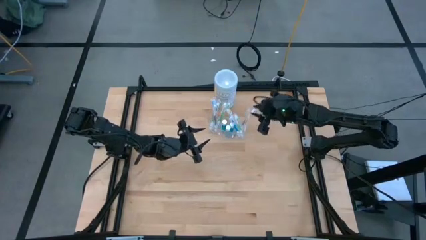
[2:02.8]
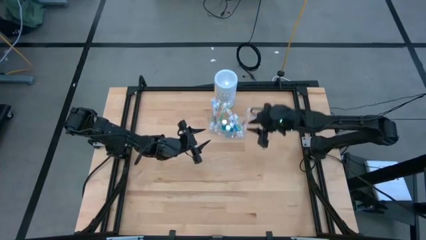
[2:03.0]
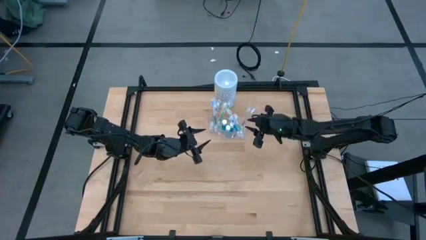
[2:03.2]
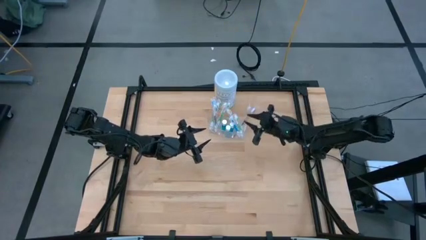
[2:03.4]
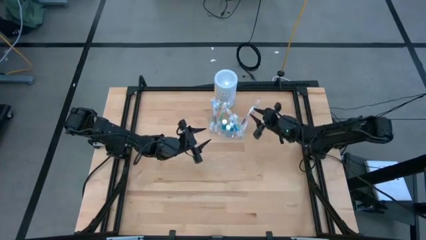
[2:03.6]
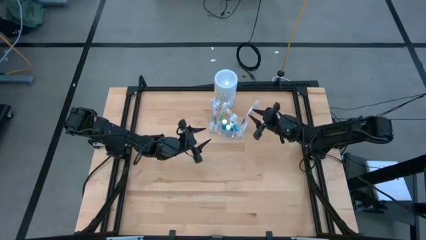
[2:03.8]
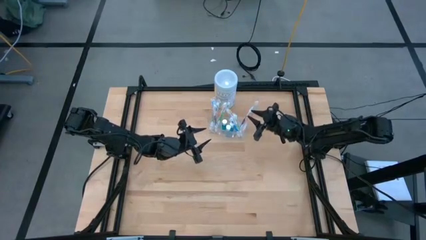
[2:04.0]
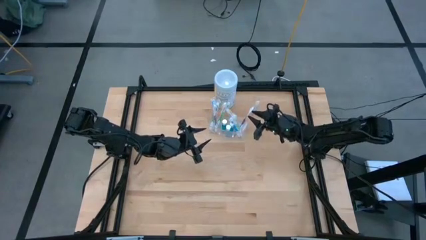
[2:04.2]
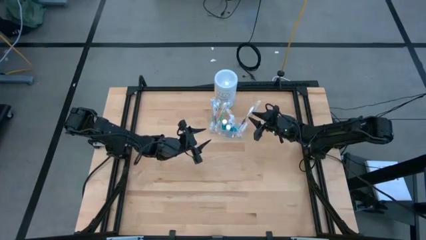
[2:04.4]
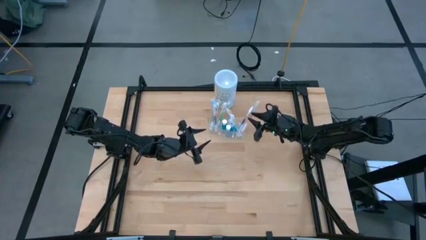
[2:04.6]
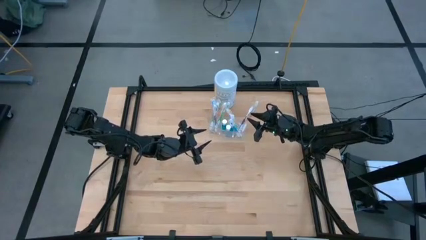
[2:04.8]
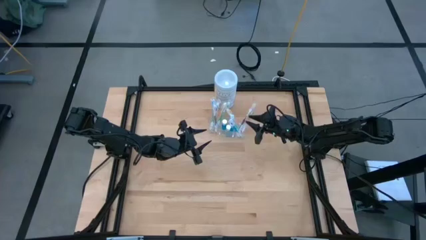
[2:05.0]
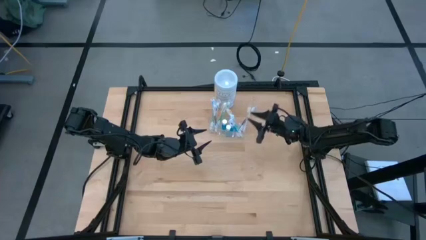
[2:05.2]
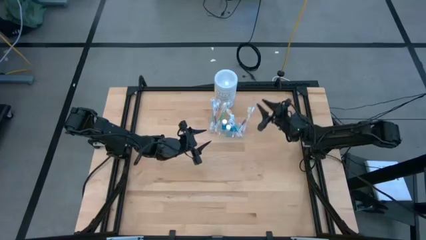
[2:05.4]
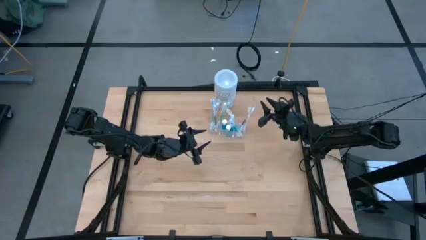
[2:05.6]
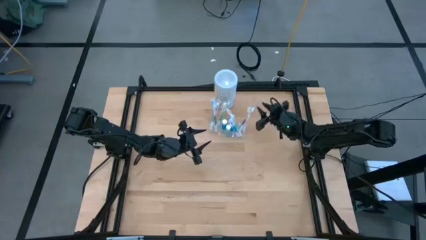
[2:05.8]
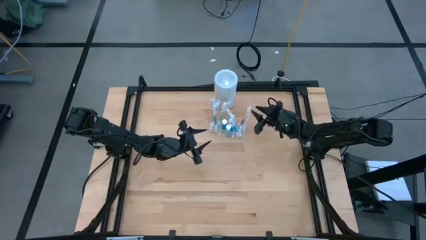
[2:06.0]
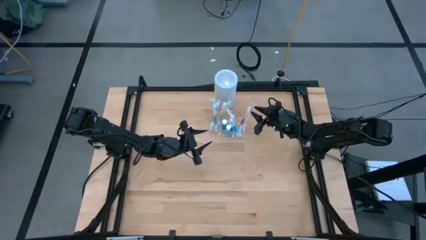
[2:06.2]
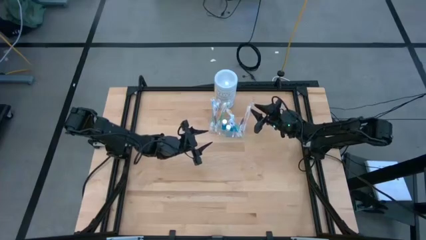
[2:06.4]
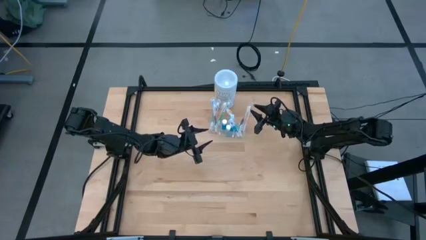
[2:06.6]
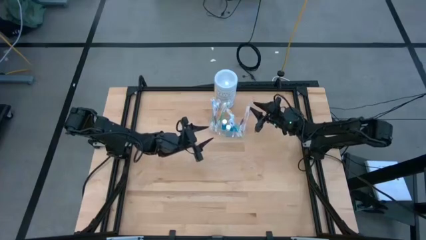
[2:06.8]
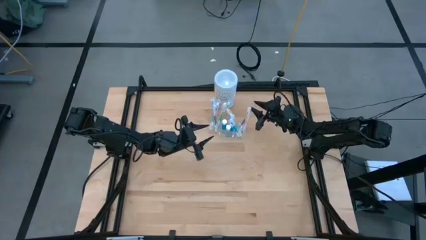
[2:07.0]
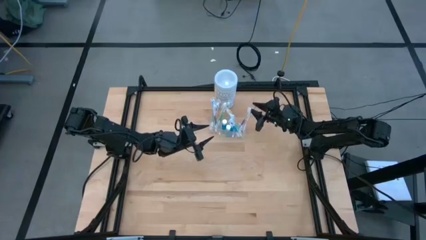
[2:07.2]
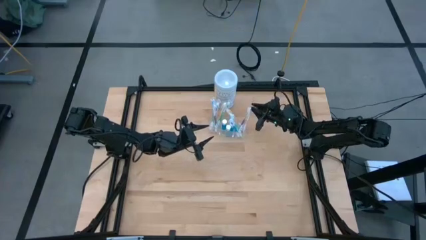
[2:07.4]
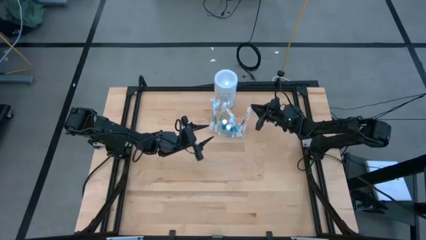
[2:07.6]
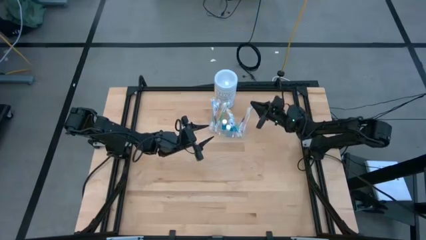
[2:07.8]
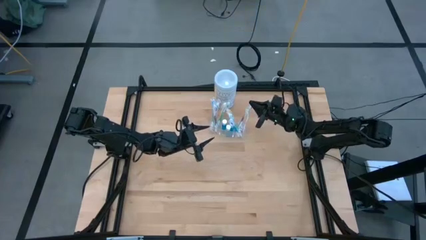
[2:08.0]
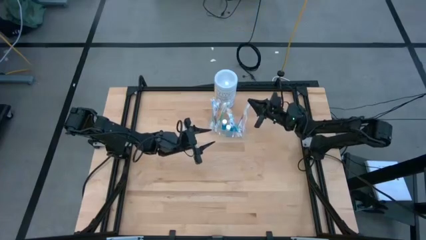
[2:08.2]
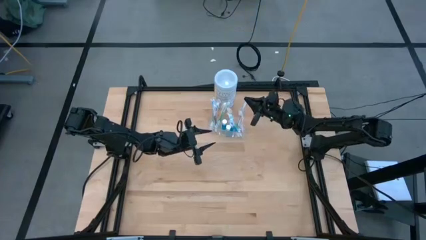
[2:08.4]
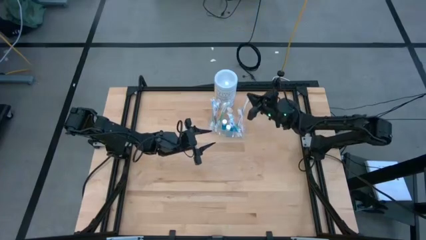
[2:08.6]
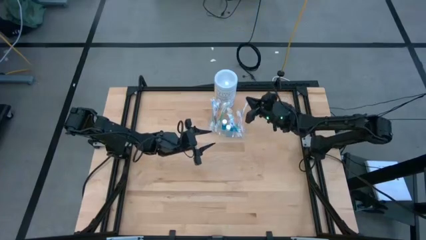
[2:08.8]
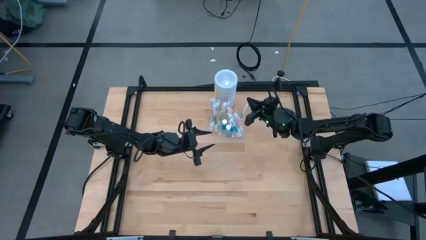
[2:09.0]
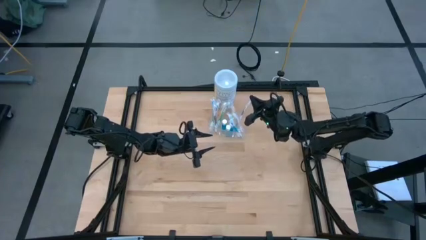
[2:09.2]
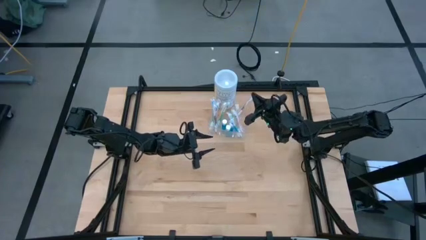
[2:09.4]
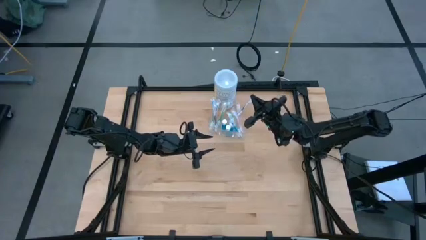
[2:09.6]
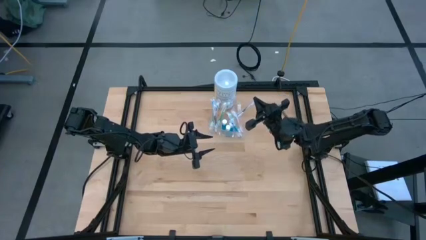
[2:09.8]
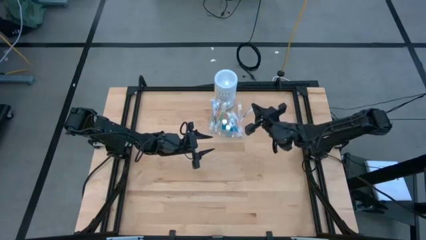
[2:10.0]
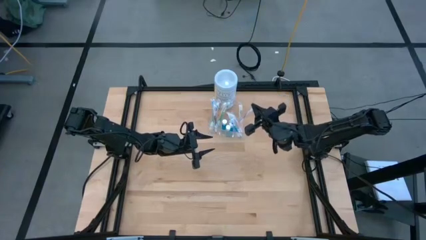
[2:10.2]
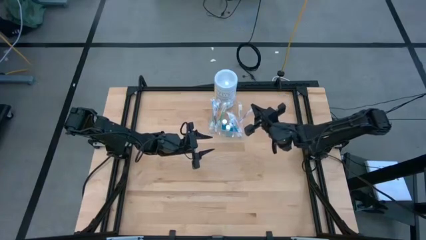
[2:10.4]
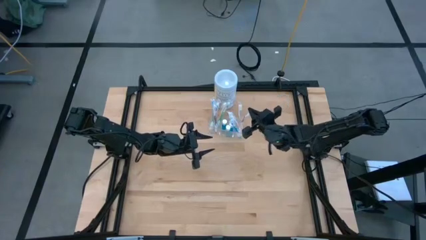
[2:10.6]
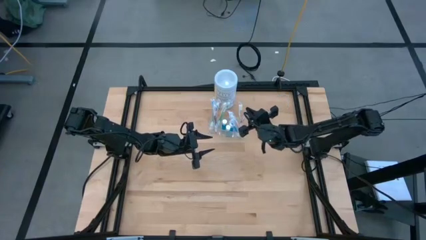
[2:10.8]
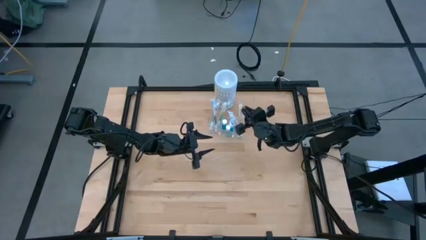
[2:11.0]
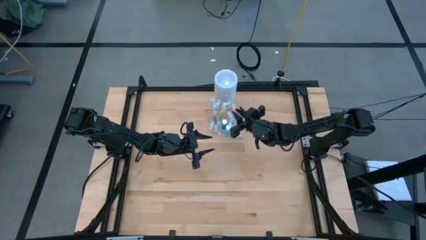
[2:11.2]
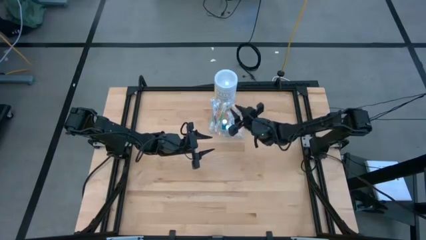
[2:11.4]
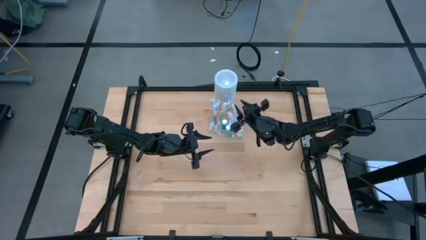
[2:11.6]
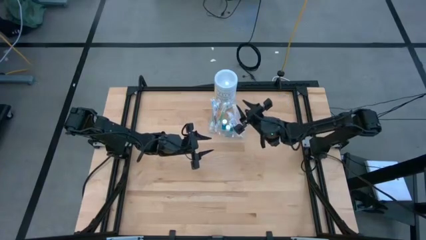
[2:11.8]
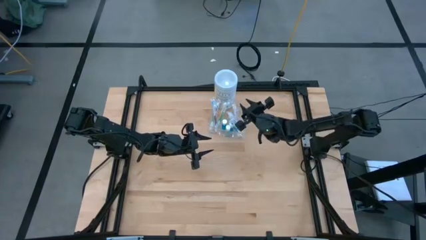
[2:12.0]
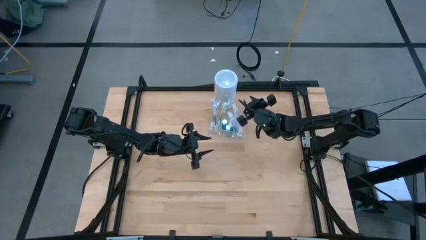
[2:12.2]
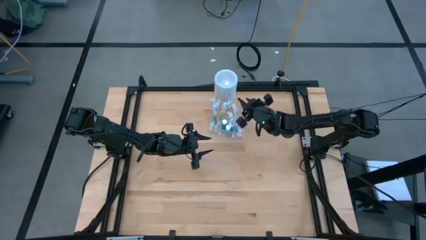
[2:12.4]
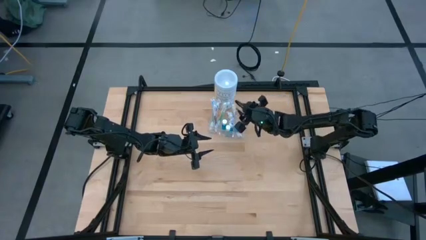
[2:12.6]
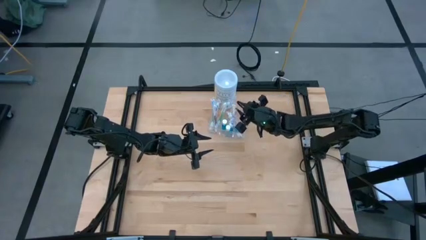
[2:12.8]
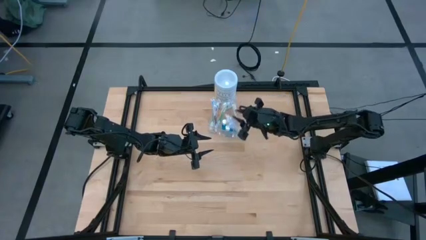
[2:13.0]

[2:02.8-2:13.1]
Task: Pick & Place toothbrushing station
Adjust the toothbrushes in the transparent organizer

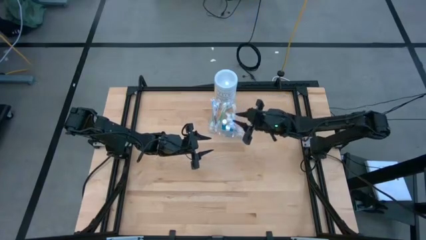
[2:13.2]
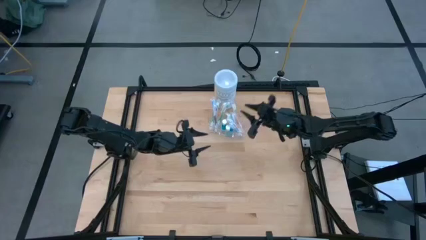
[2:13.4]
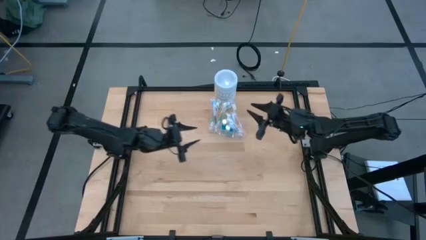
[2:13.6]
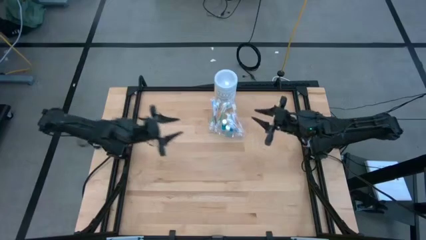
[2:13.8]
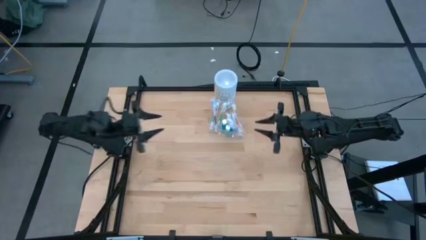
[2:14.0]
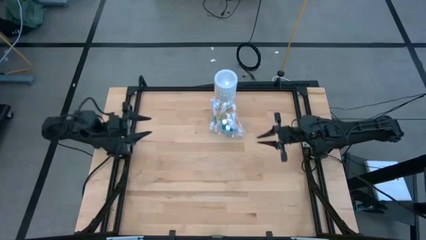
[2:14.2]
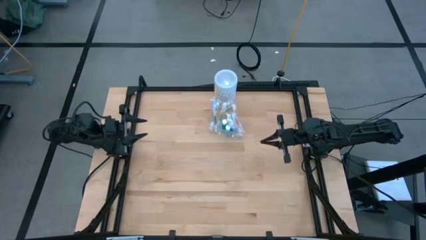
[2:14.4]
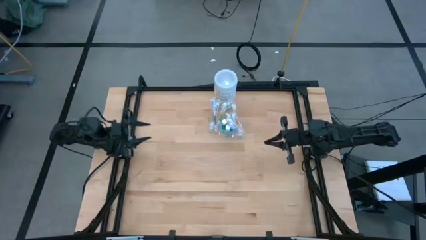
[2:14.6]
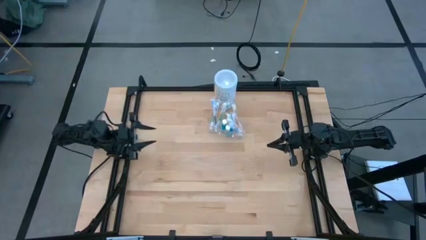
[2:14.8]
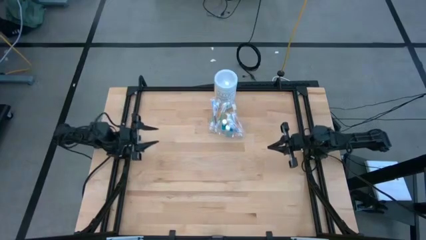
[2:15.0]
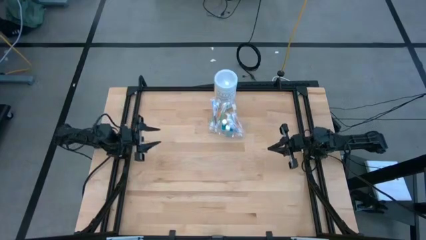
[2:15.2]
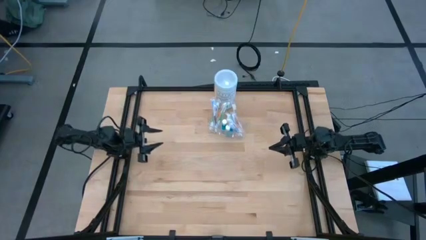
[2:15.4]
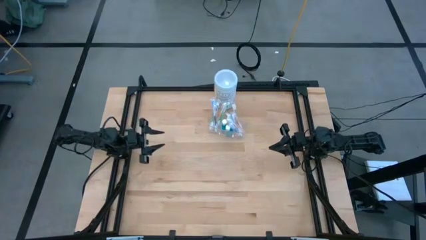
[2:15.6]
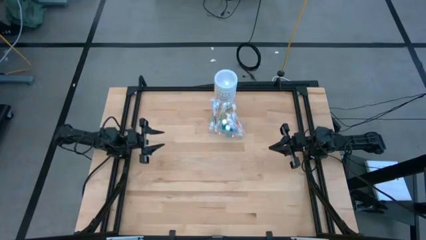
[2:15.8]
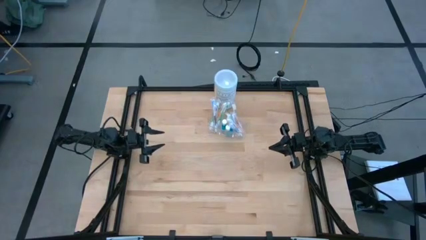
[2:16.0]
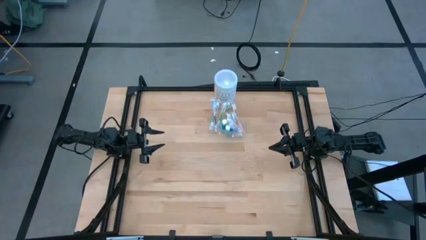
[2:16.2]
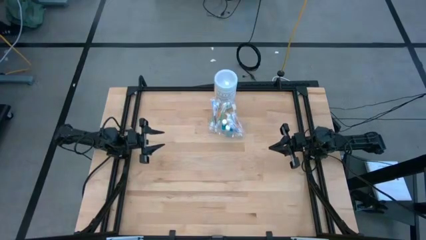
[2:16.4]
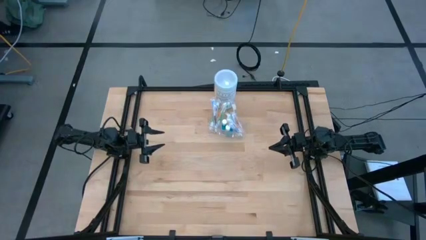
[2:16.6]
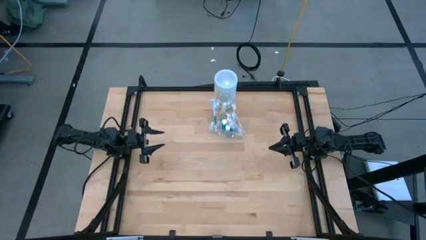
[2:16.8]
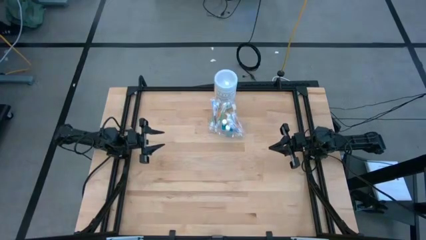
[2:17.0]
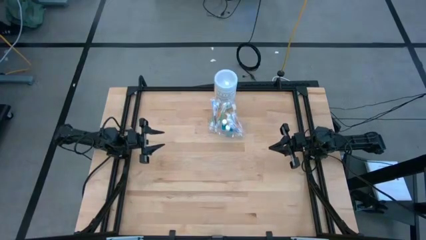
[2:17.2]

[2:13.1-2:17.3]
Return to Home Position

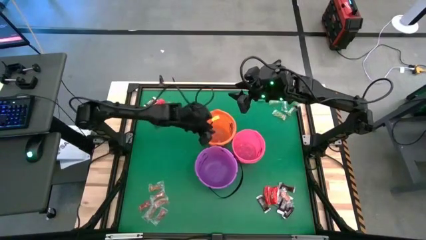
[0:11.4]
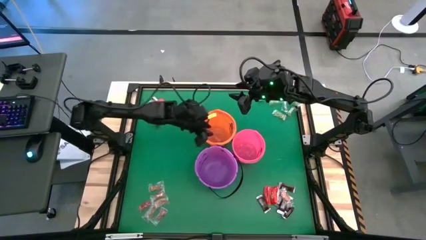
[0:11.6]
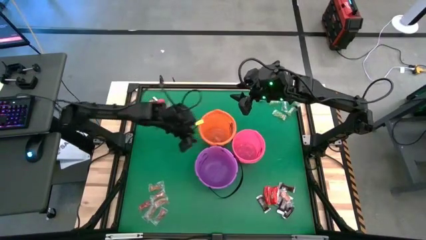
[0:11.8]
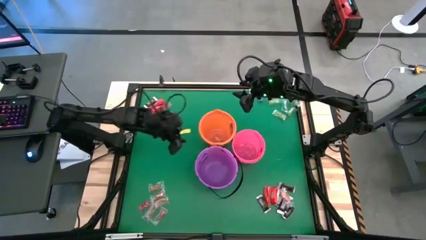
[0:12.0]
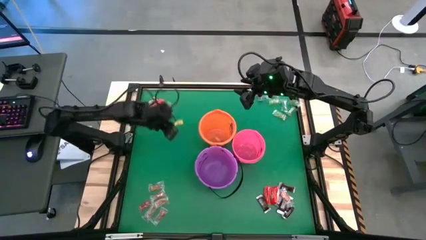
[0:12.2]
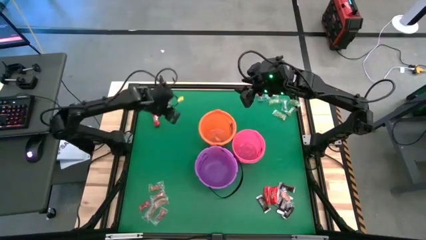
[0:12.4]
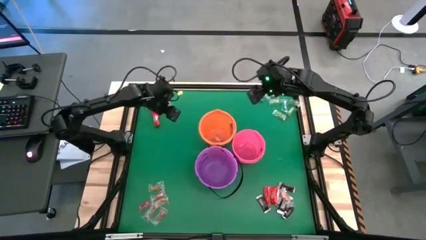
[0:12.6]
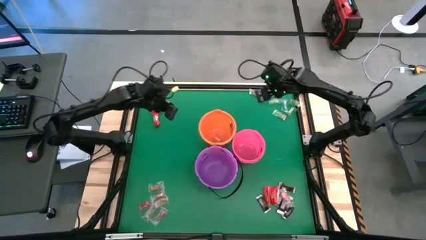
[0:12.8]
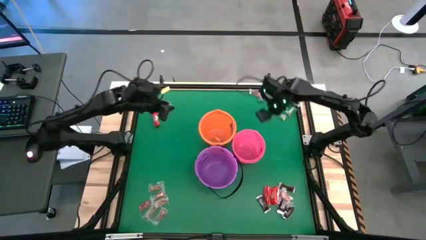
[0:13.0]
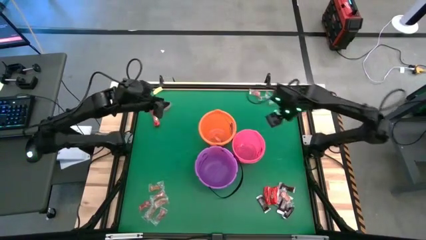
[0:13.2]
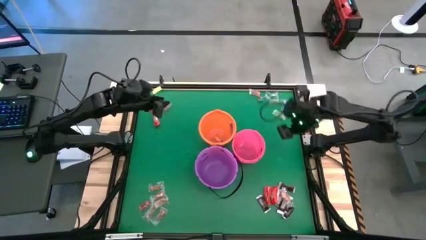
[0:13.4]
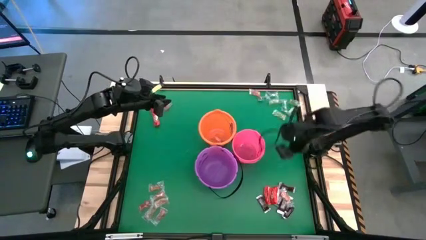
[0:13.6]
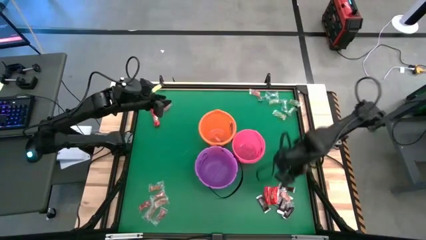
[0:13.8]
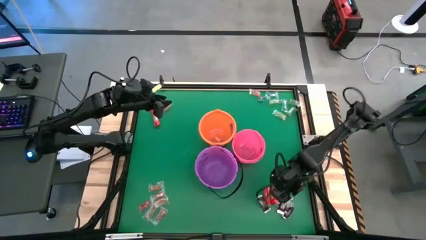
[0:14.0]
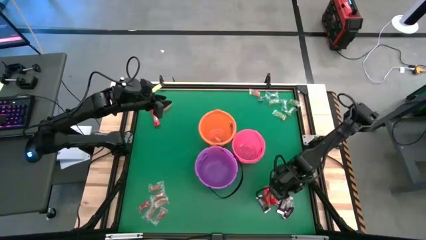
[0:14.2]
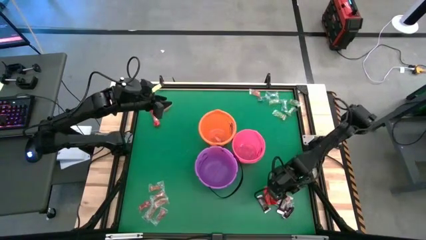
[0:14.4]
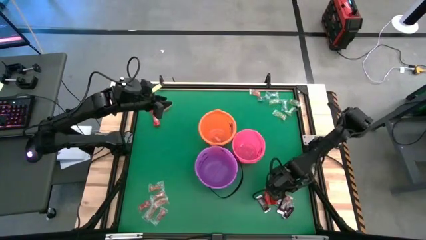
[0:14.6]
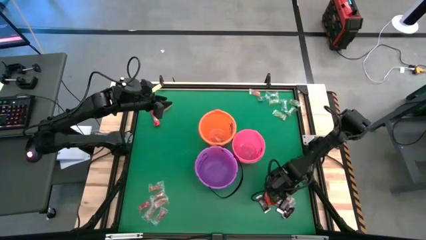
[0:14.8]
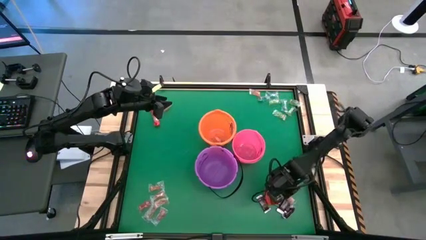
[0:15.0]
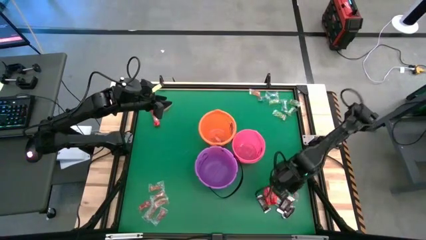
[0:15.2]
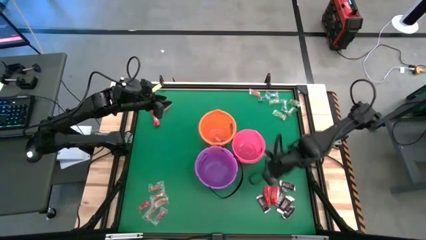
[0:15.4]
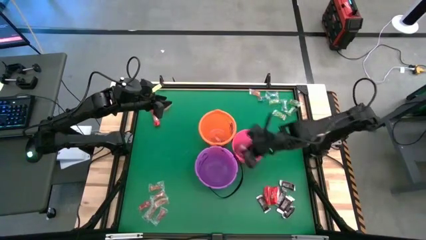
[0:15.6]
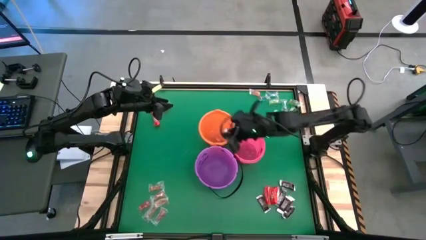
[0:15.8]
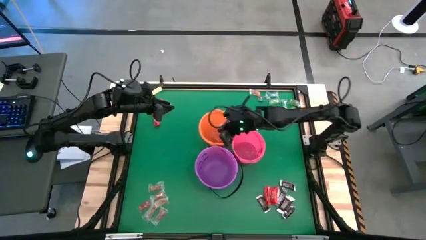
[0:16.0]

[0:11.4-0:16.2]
Task: Sort candy by brand, put in halloween buckets
Put the orange gummy into the orange bucket
